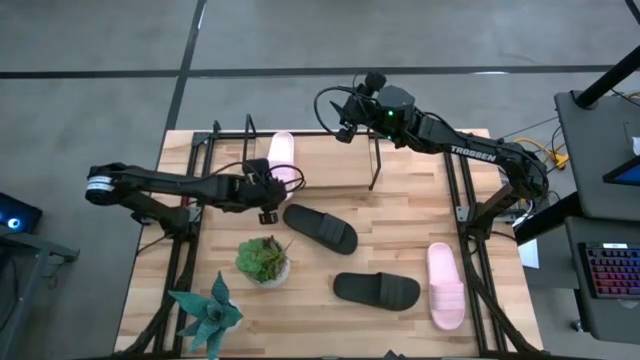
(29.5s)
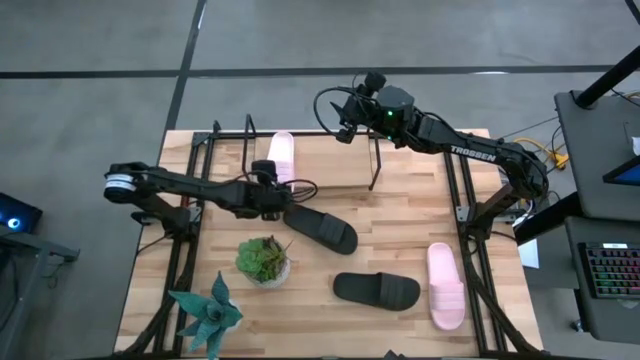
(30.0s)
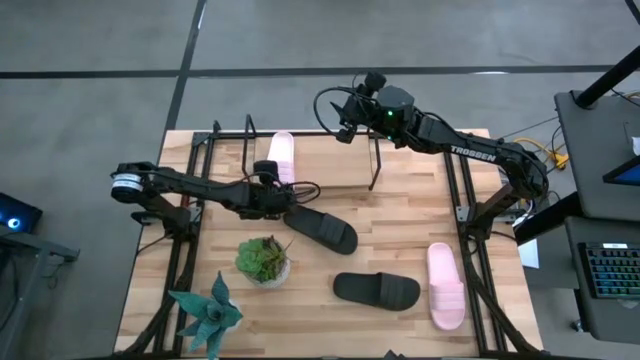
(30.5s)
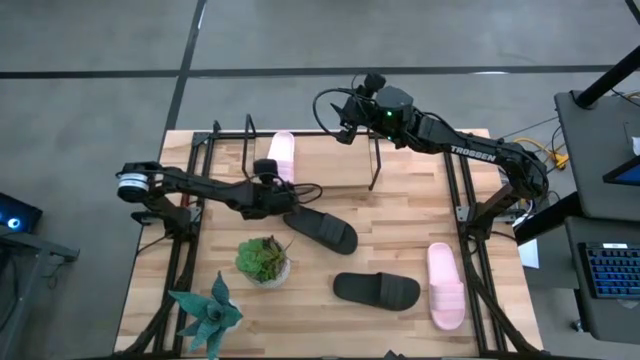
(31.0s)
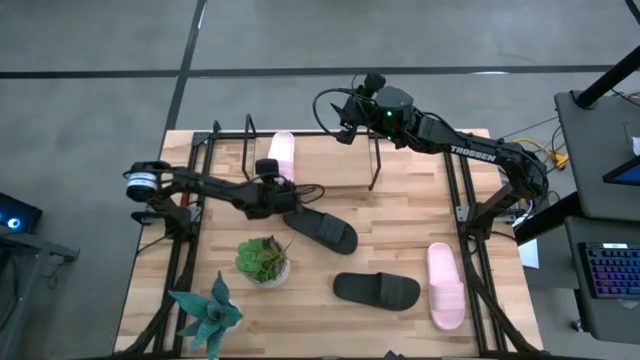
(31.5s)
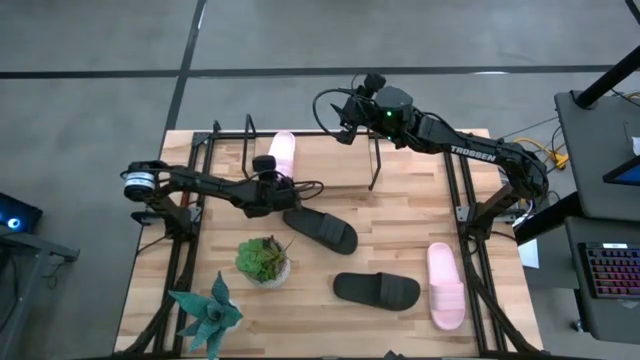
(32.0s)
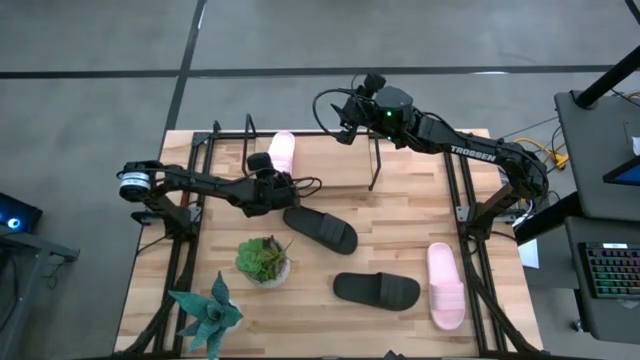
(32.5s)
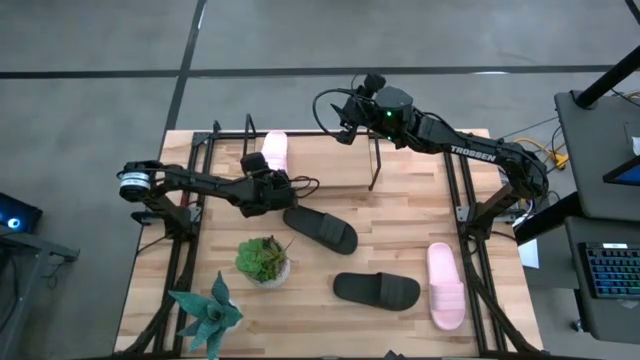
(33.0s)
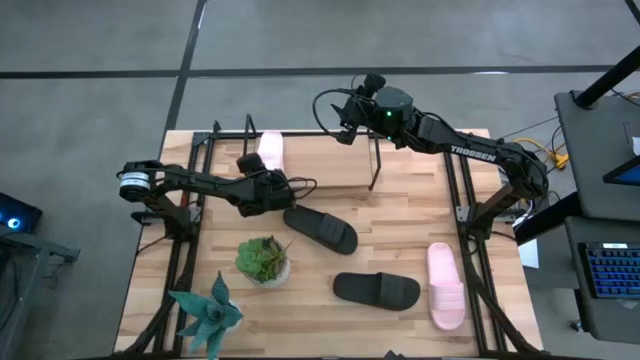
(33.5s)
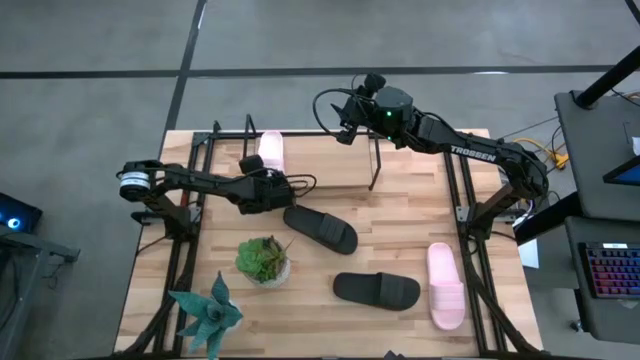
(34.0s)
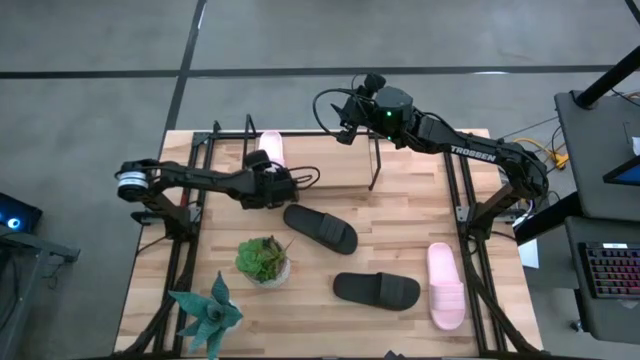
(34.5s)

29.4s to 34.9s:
Task: Pick and place slides into the shelf
Adjust the top pink slide on the shelf

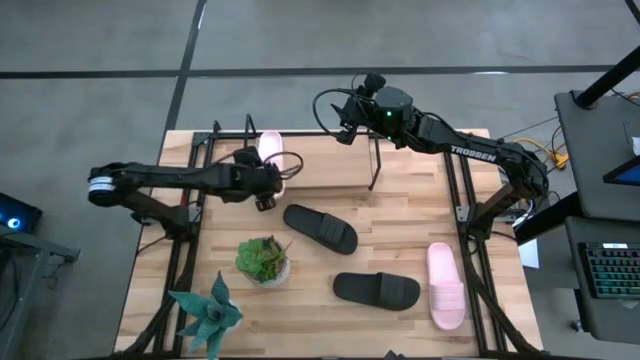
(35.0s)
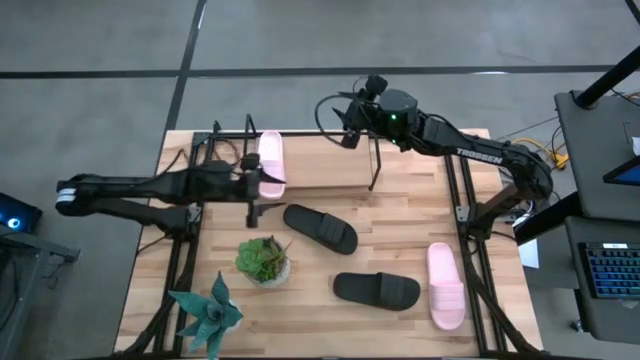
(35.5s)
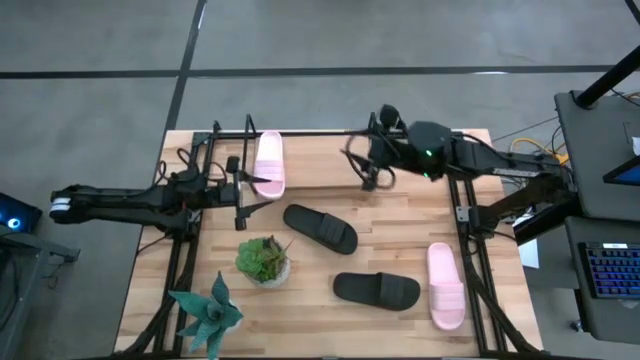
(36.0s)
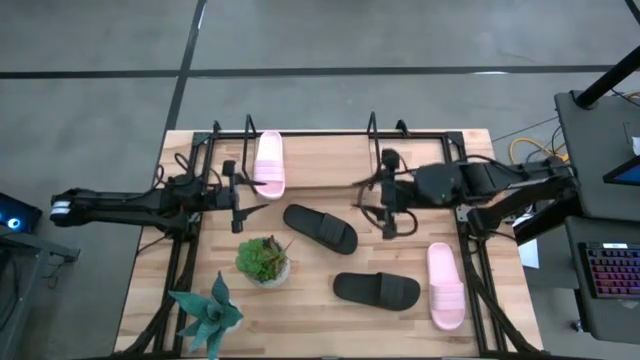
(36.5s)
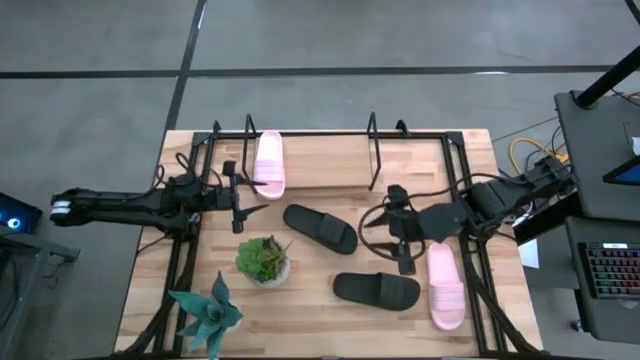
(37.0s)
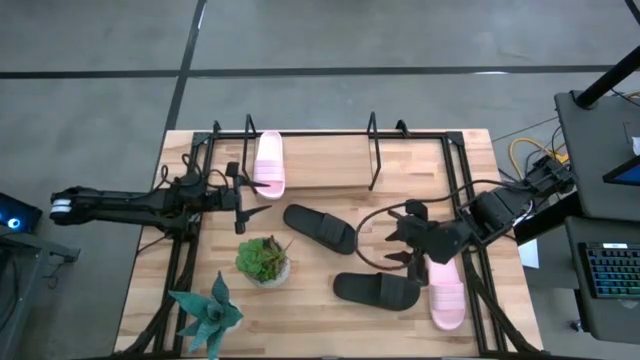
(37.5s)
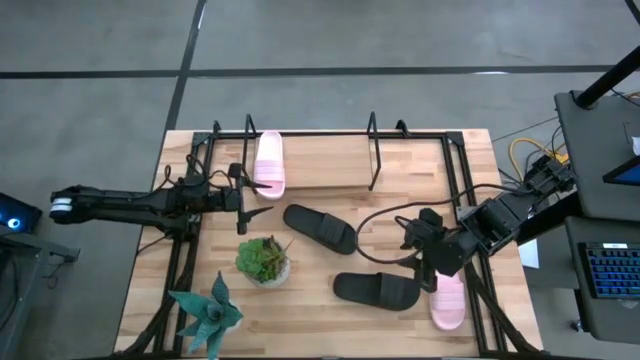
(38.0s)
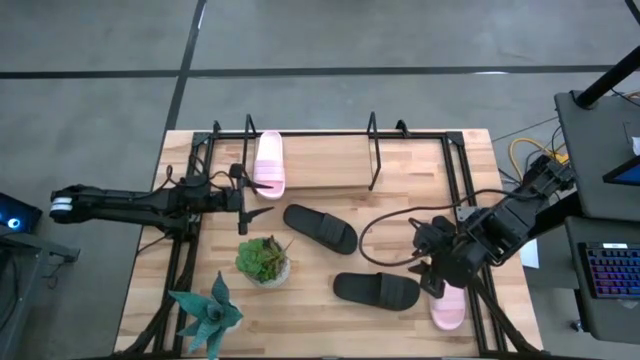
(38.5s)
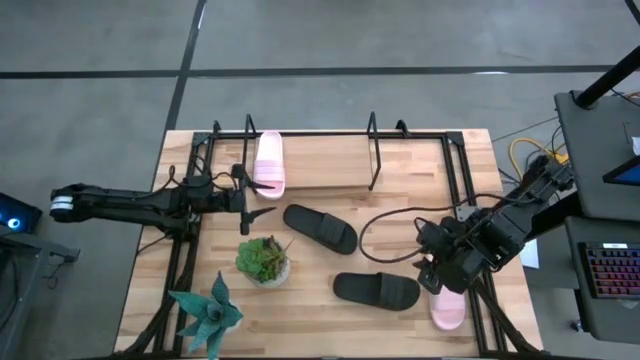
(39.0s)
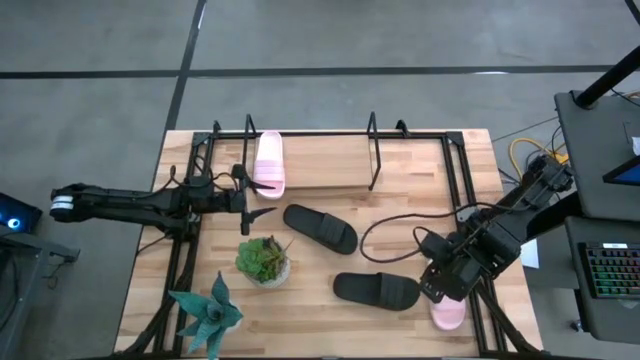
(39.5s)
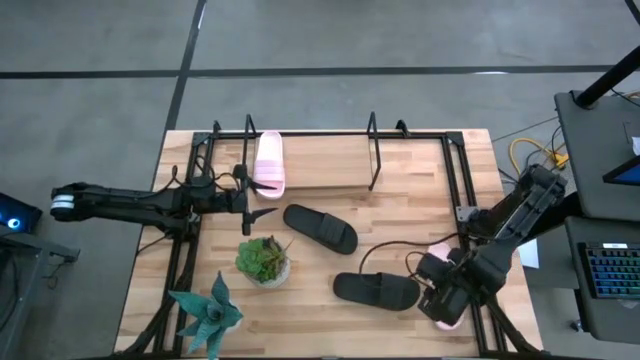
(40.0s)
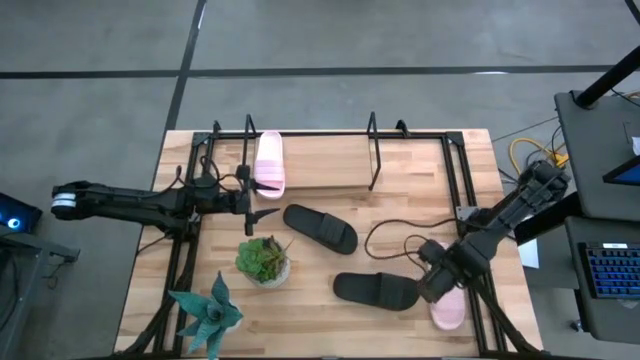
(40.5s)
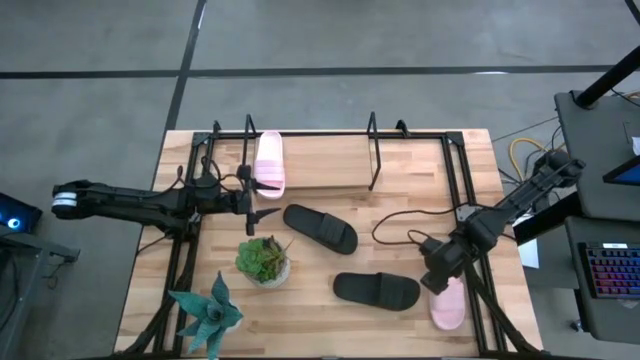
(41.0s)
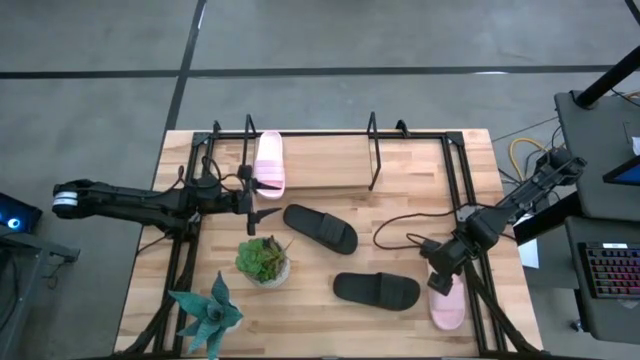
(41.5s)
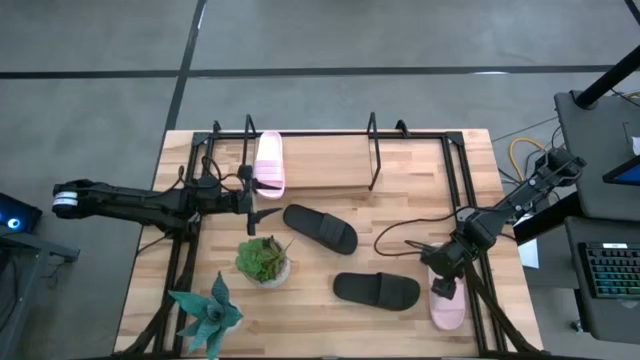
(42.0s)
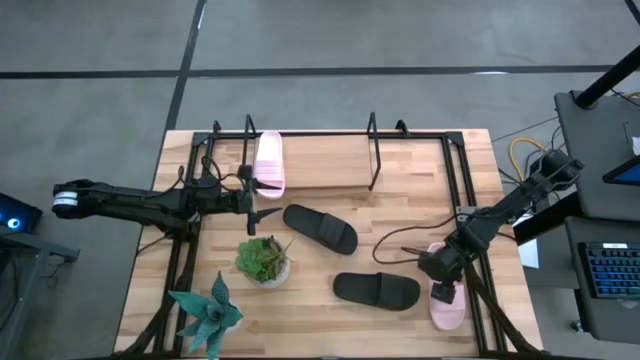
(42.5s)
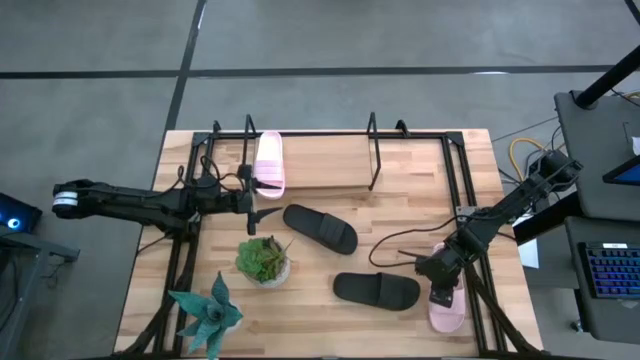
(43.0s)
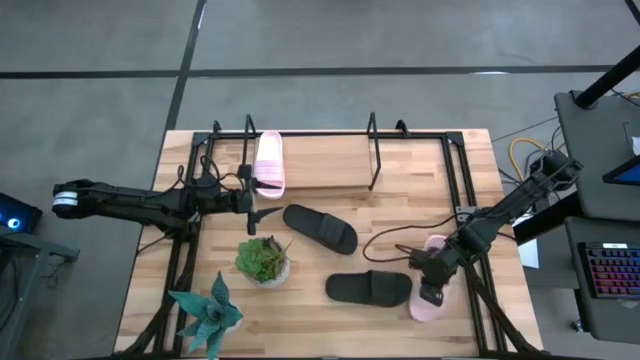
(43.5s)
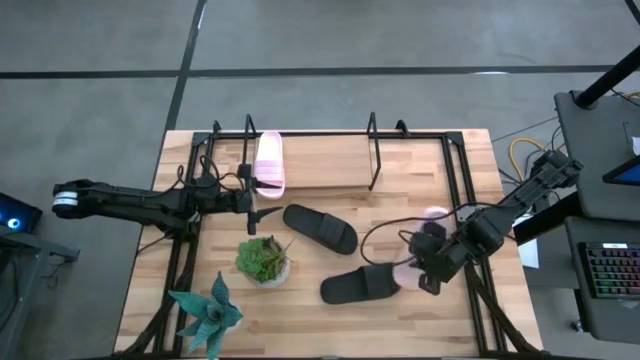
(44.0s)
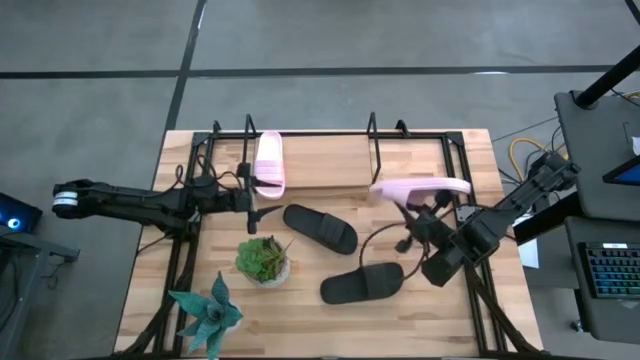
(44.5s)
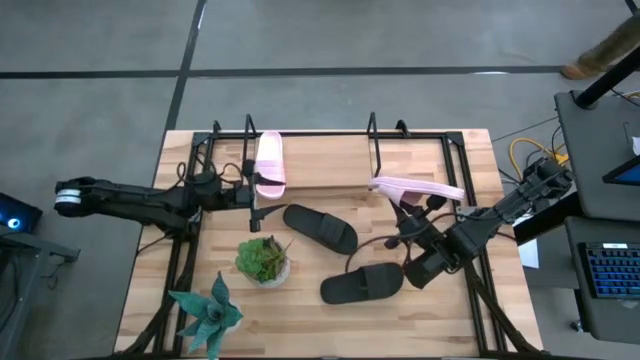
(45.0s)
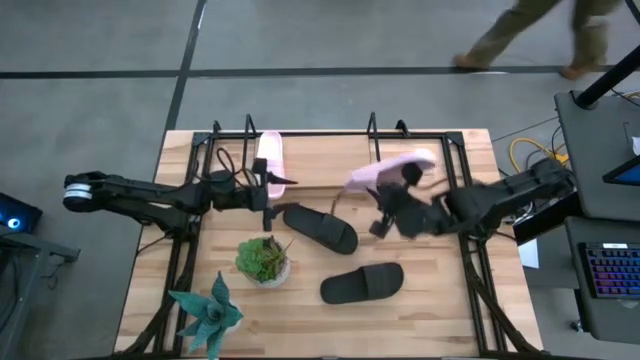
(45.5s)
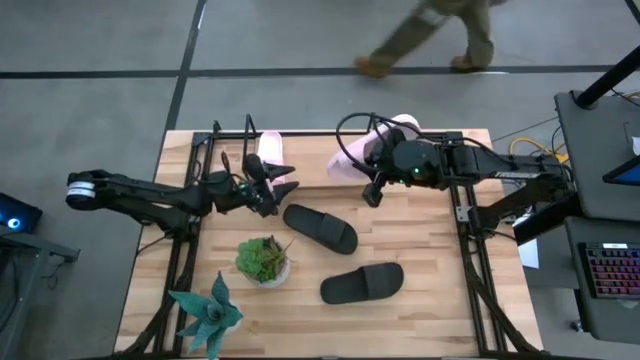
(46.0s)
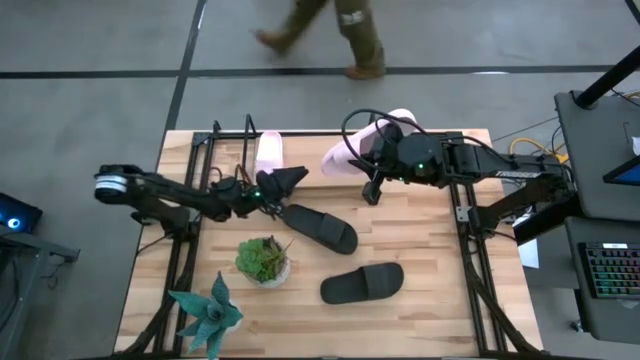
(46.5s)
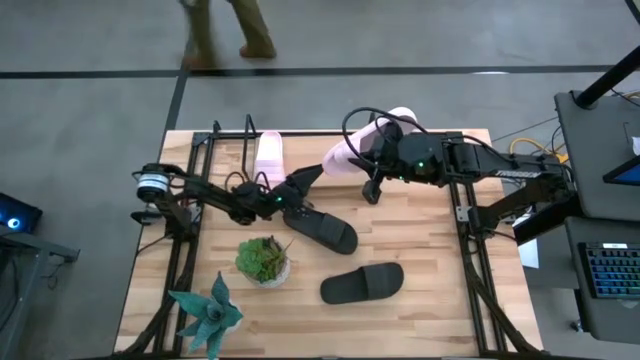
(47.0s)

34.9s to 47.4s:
Put the bottom pink slide on the shelf
